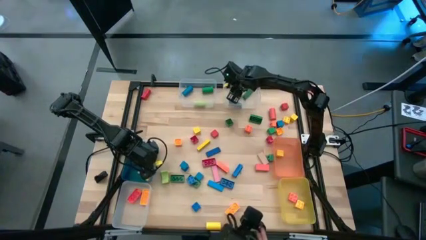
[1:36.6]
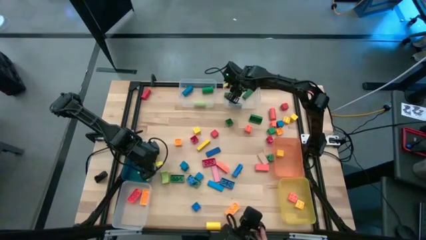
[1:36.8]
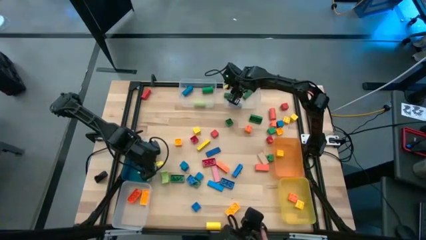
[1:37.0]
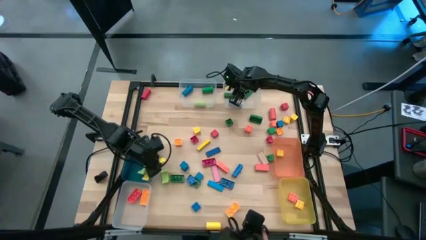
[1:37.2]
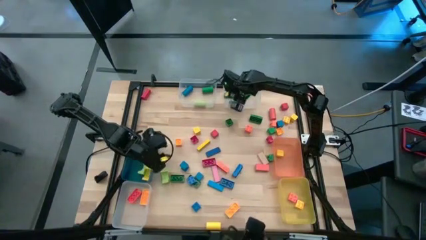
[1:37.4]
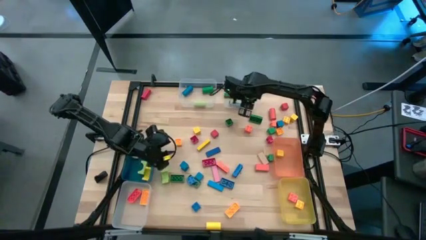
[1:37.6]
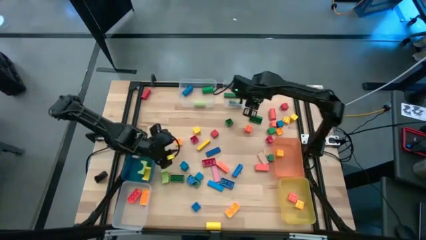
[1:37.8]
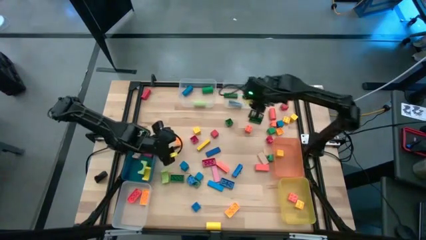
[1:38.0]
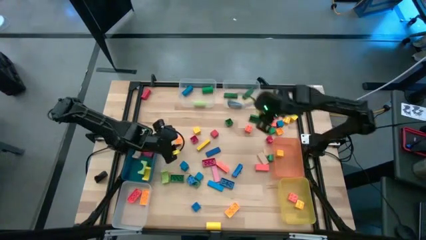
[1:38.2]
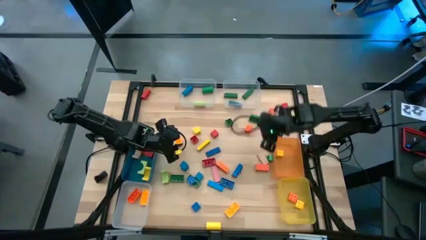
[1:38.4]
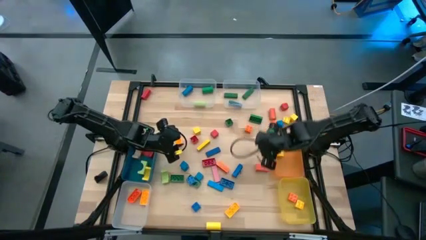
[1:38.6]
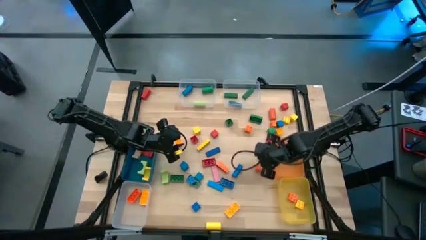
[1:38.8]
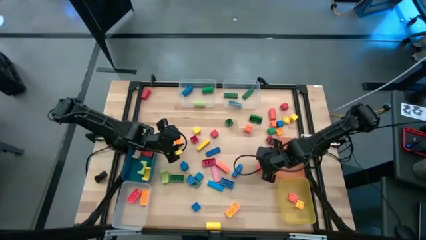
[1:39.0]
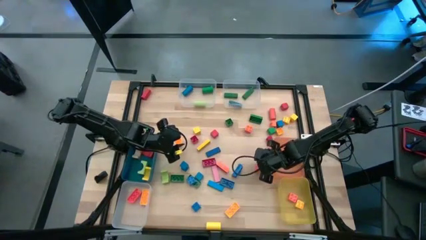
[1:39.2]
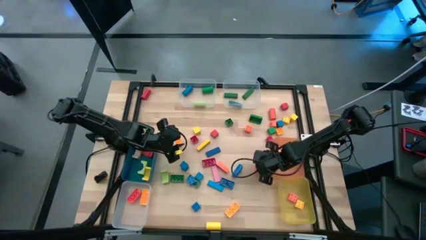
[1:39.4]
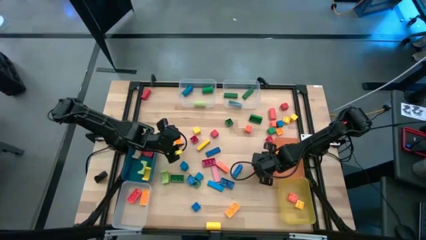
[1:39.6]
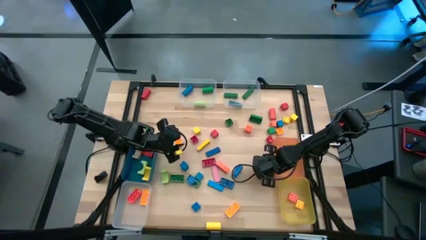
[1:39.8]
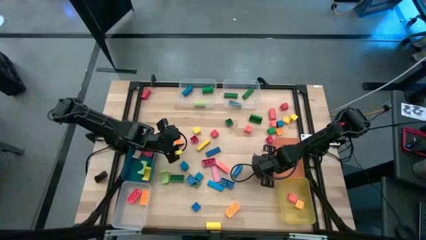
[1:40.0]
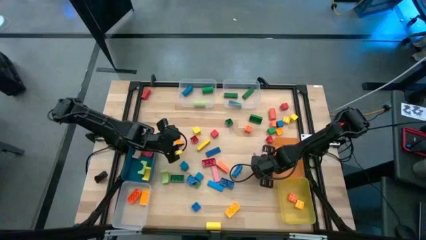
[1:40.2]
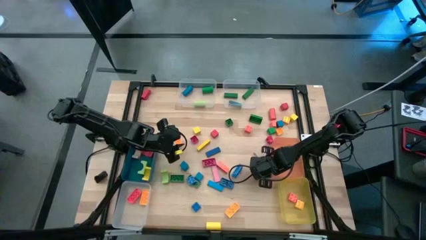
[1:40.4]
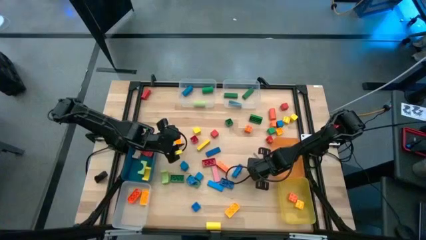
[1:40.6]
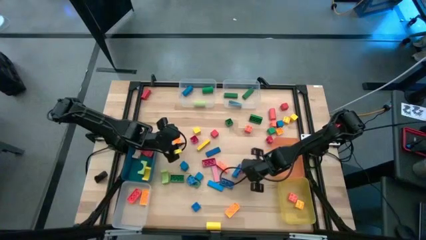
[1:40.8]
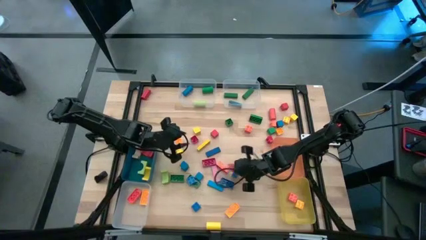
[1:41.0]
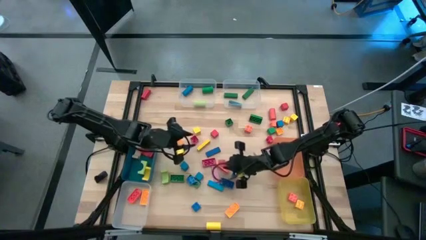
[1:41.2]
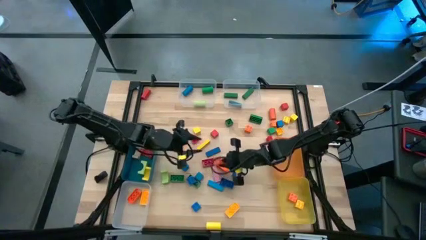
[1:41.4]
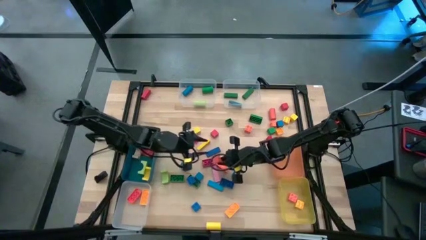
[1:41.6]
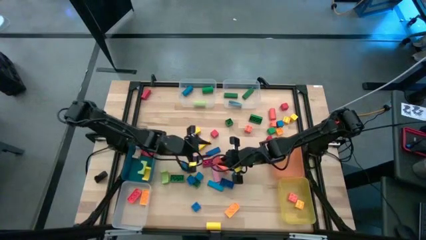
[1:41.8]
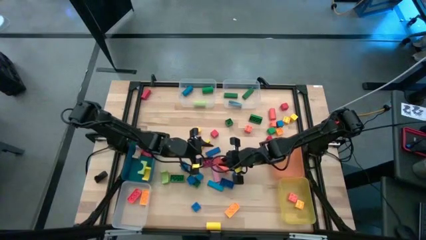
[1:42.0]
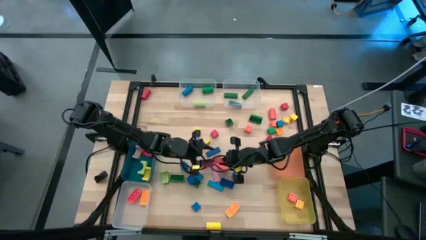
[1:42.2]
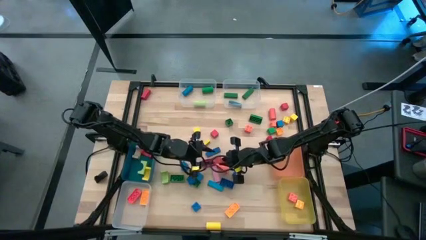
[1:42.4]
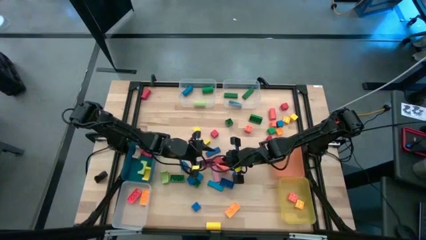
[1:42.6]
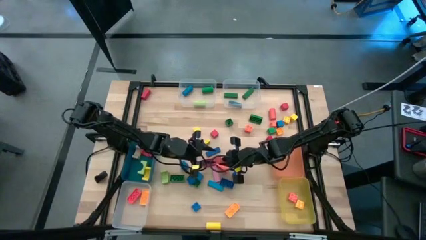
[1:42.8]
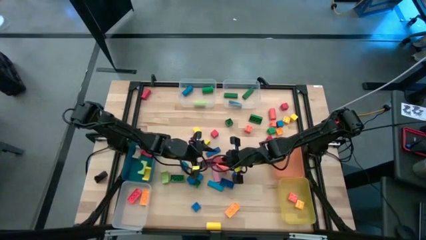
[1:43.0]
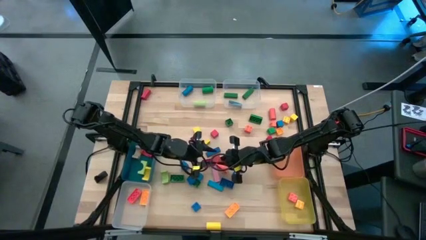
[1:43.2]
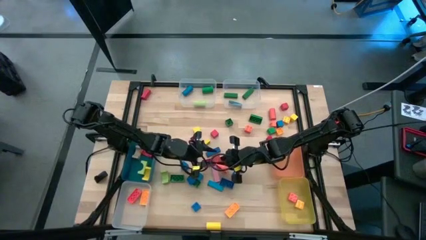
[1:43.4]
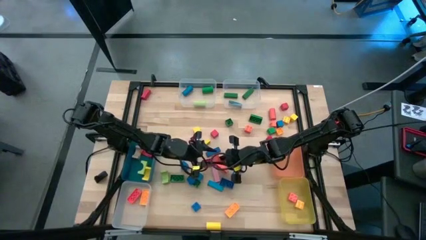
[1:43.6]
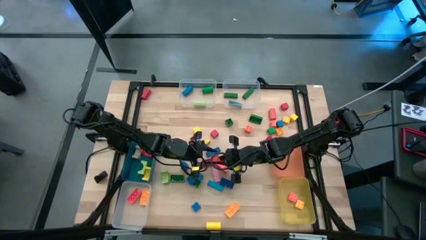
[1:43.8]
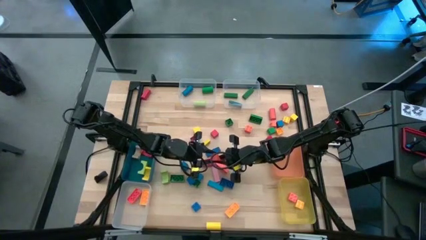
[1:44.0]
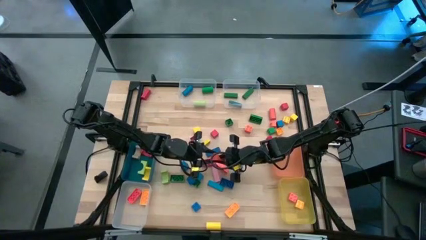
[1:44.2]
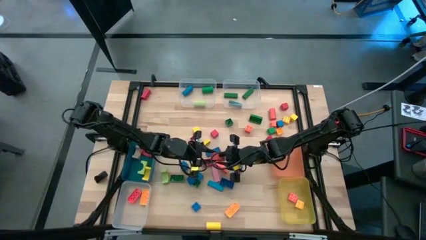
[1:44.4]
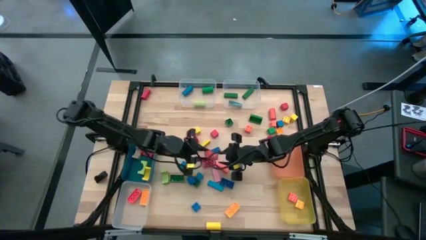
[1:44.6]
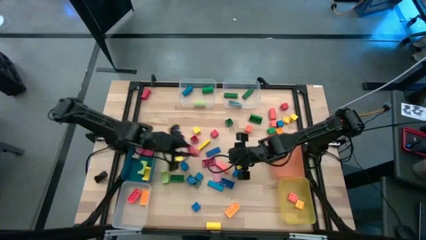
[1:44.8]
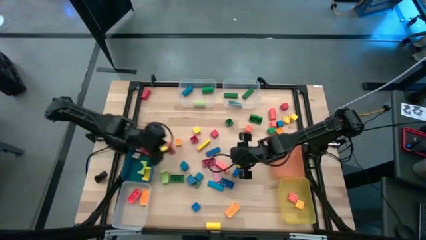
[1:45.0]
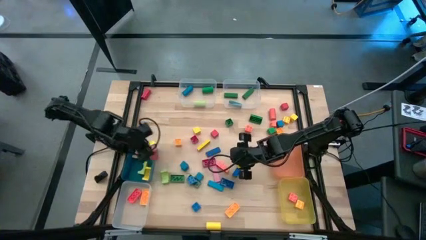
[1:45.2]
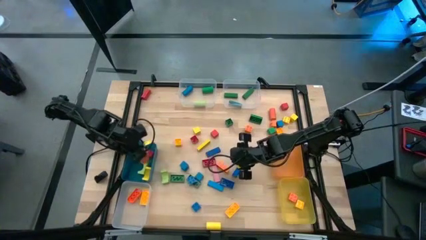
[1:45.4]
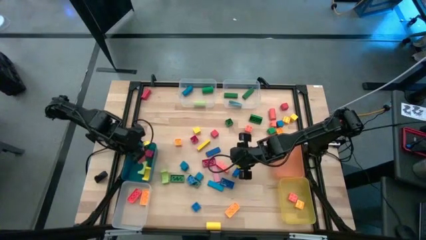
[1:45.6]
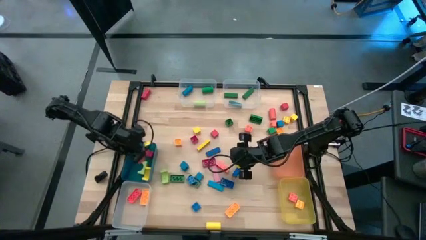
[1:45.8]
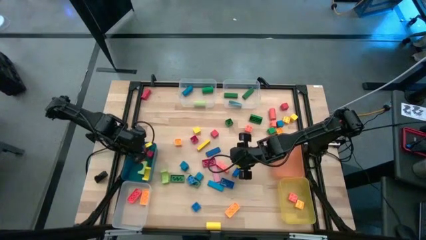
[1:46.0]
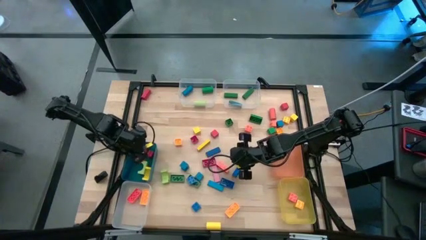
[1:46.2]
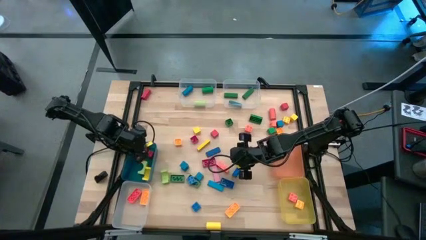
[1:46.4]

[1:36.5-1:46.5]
Task: Sort blocks by size
Put the orange block into the blue bin

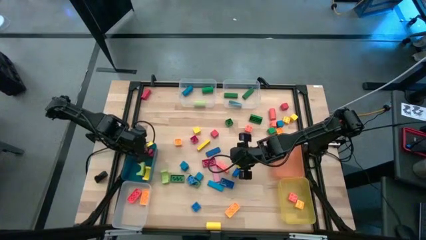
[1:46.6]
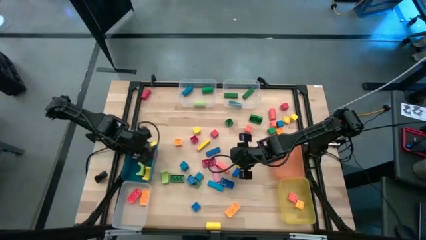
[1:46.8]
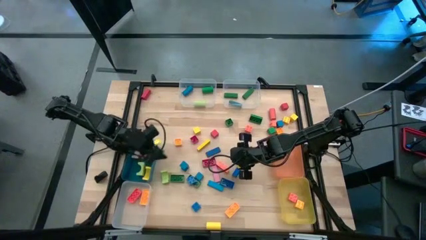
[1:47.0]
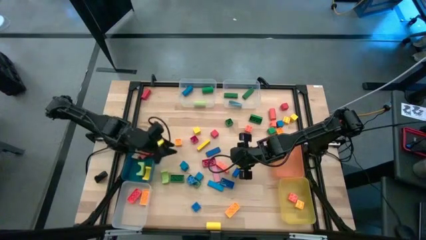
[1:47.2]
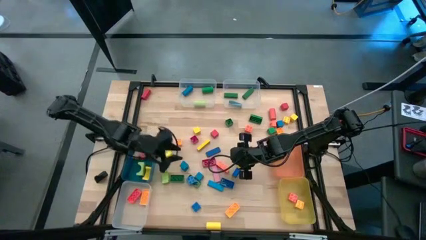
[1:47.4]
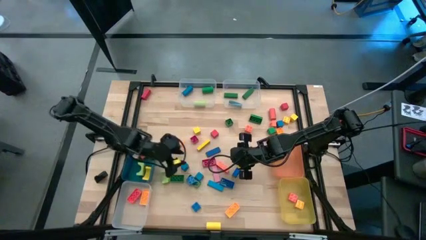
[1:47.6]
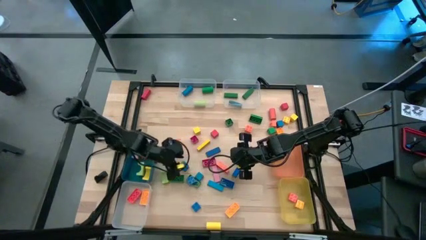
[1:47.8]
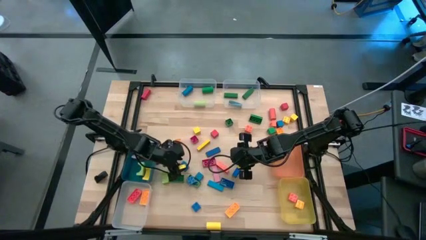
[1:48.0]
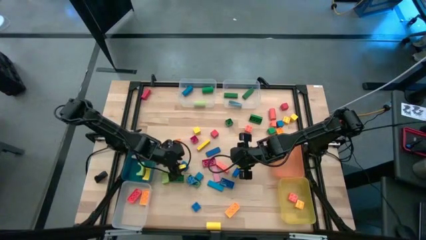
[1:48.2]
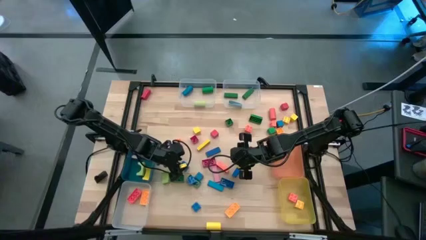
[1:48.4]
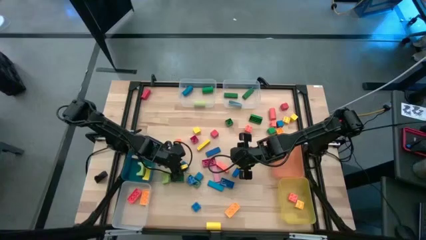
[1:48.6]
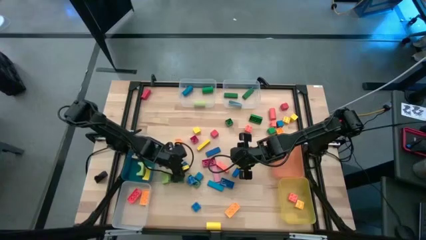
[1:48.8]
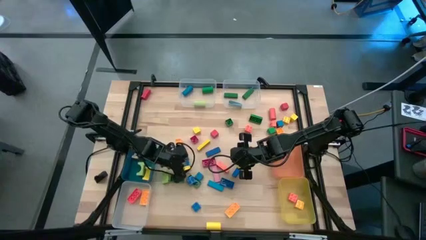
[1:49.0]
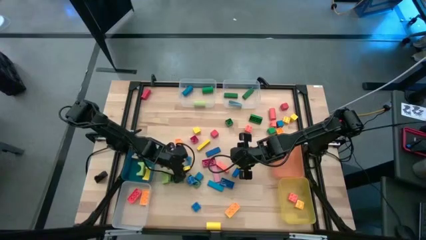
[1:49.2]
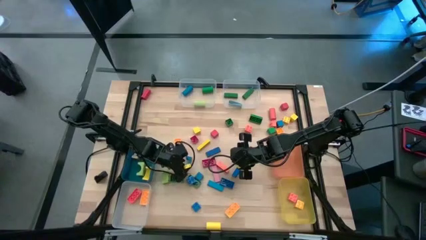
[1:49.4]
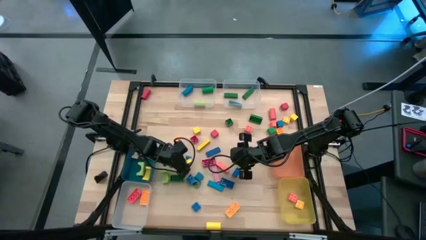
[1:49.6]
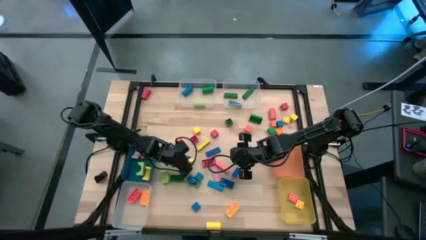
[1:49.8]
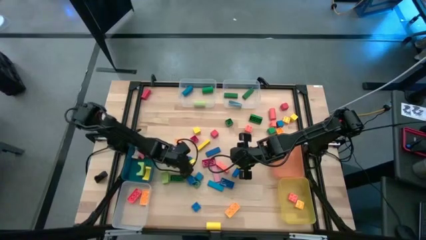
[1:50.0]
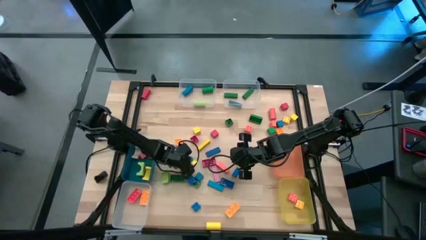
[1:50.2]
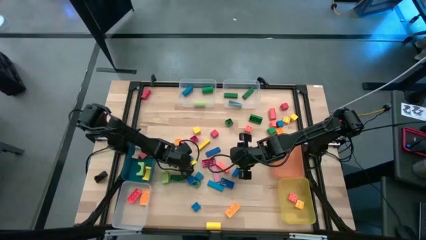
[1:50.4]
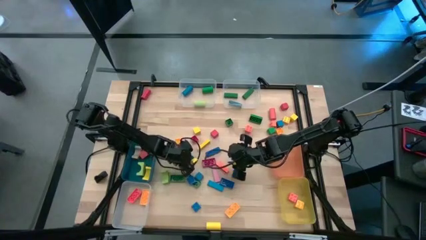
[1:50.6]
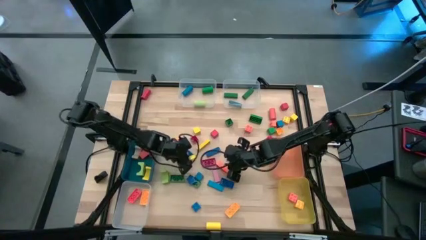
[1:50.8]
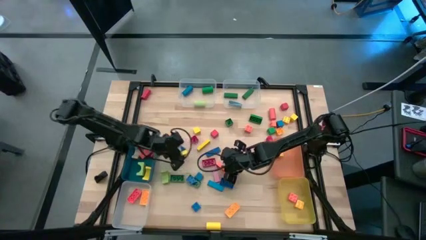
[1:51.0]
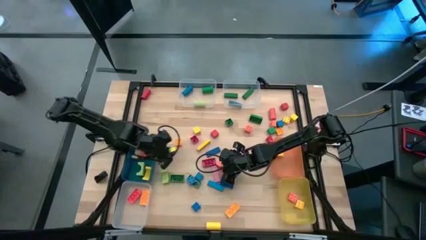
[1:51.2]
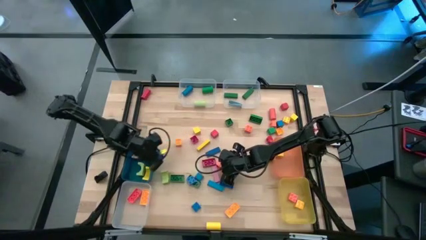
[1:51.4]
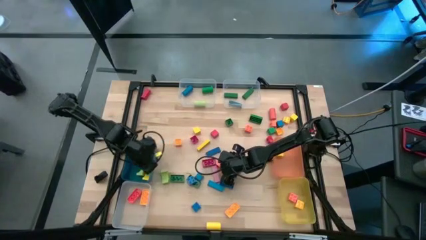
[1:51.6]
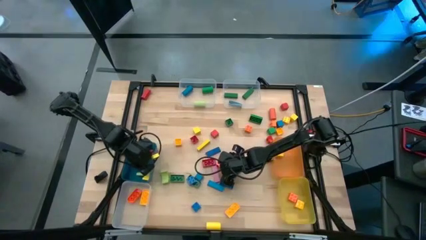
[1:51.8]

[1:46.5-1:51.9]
Put the blue block into the blue bin

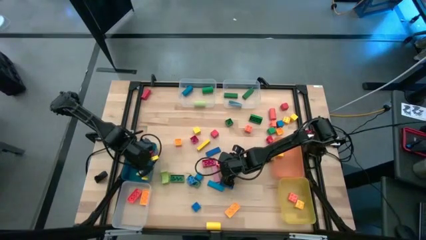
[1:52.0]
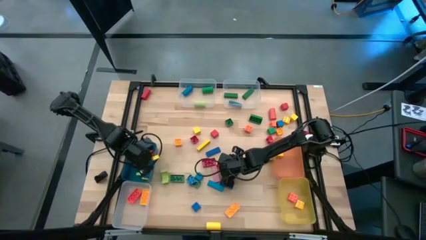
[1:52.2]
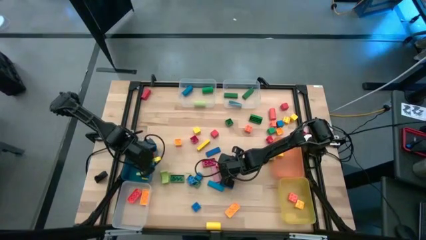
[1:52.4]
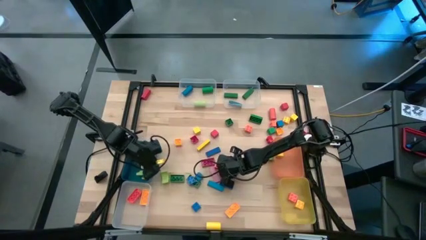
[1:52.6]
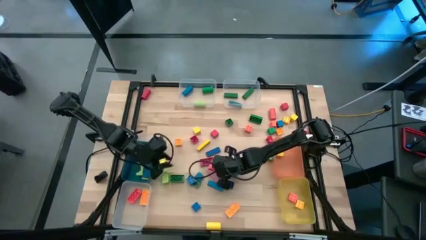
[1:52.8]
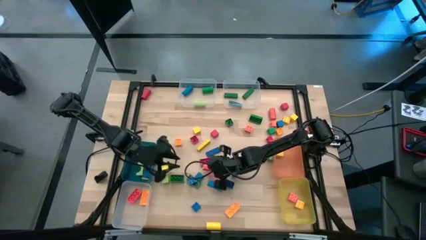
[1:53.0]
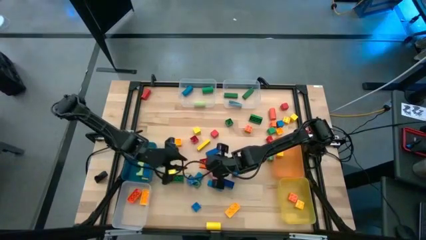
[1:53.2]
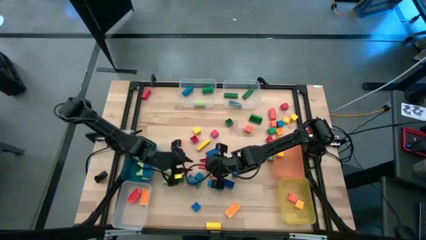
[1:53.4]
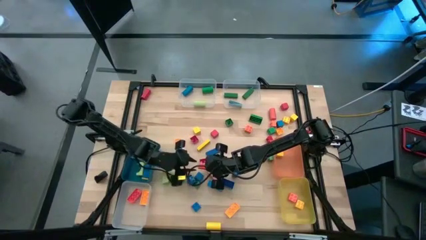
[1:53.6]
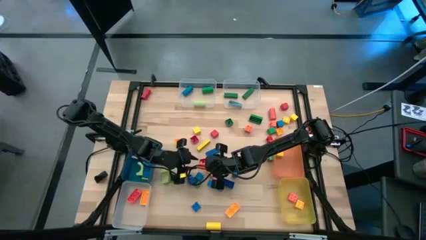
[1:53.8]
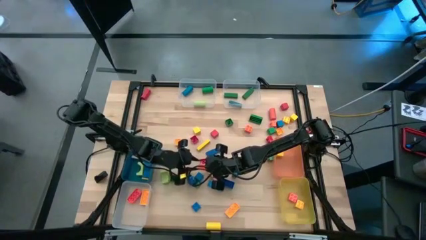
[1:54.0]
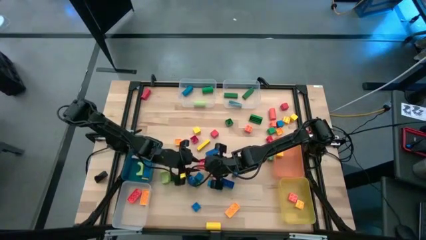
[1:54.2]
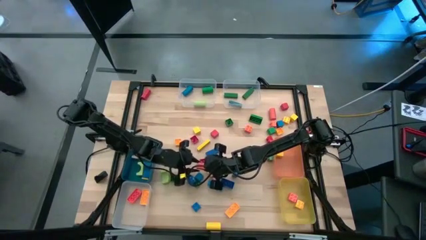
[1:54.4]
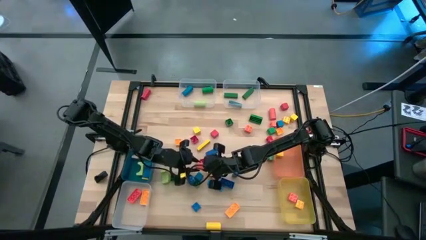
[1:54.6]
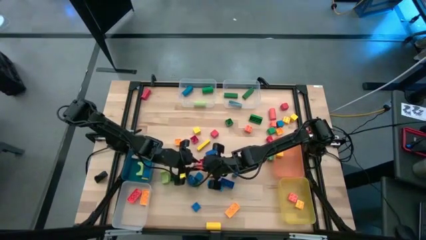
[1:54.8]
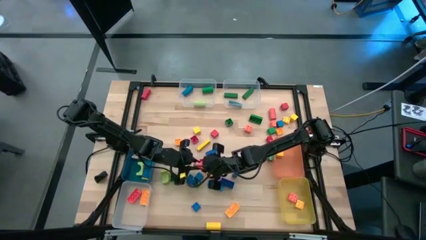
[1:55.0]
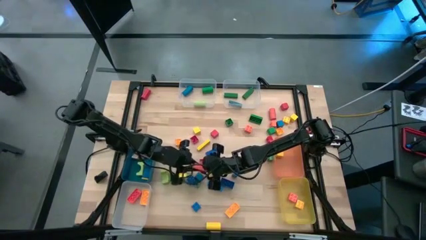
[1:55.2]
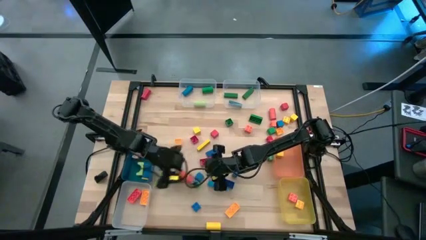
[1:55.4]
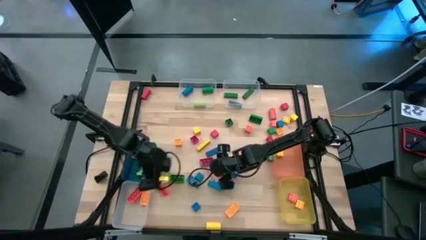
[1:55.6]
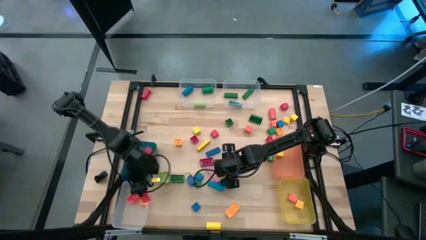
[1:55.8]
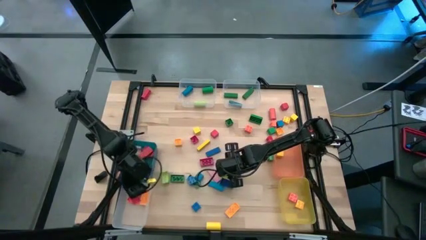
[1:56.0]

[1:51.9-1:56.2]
Put the orange game piece into the bottom left transparent bin
